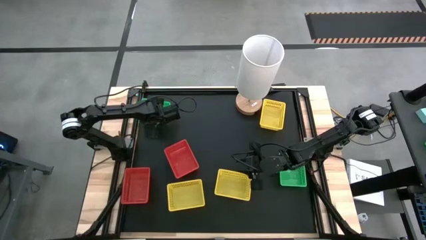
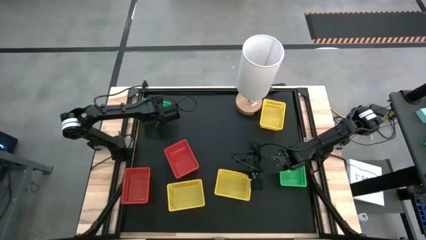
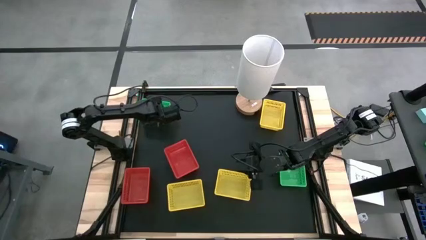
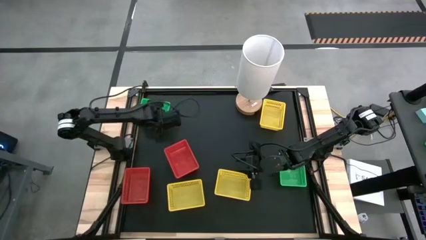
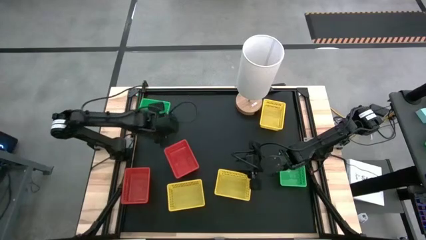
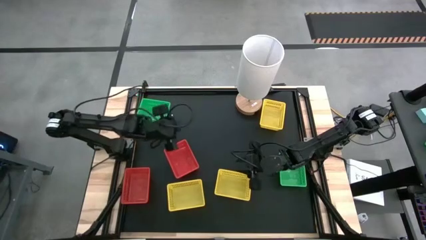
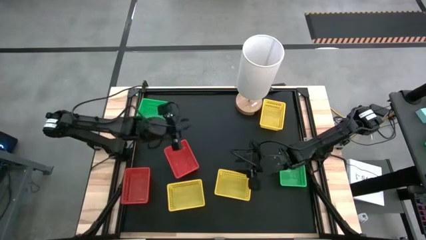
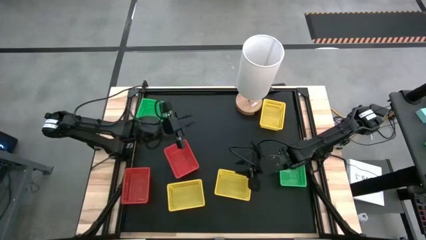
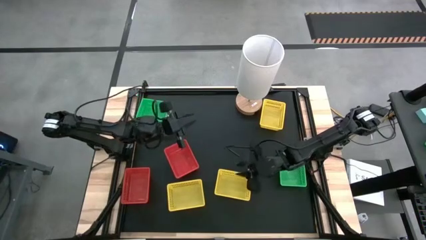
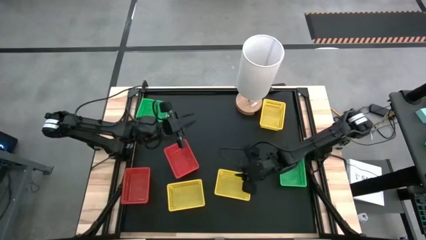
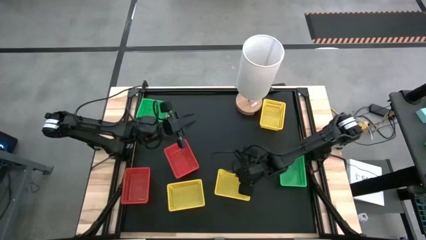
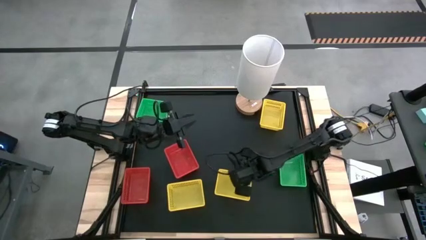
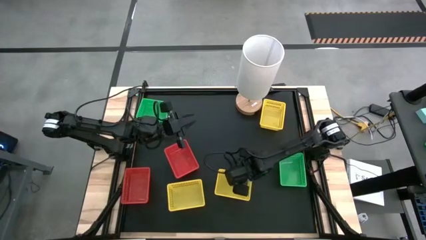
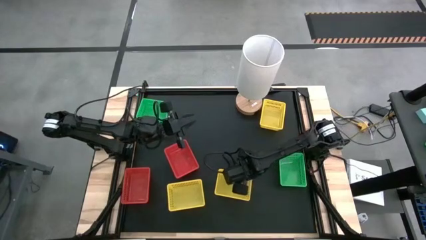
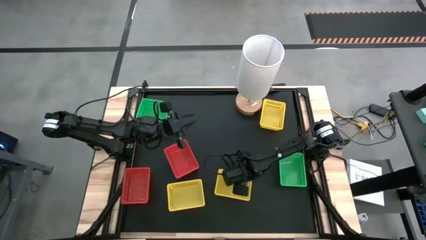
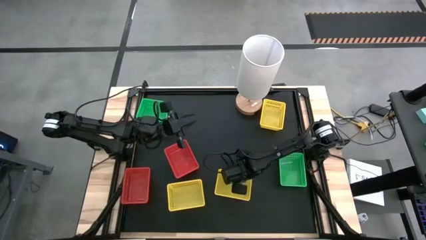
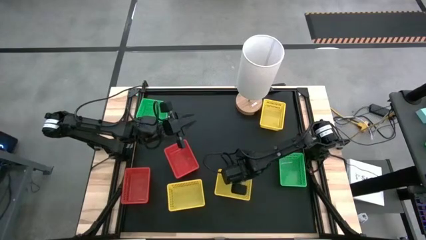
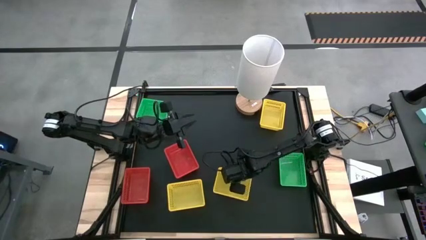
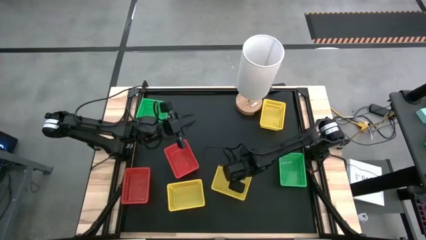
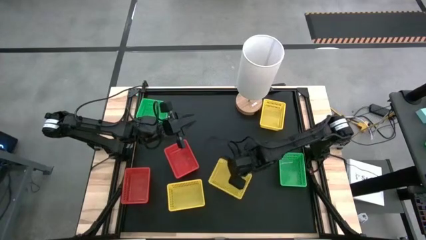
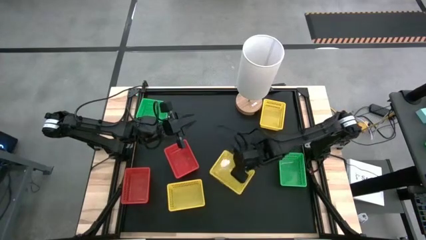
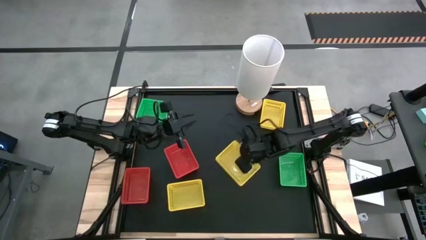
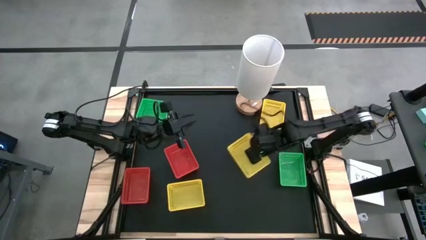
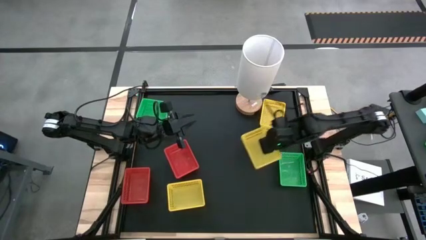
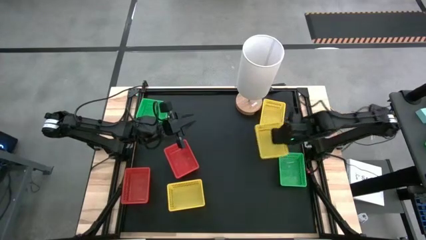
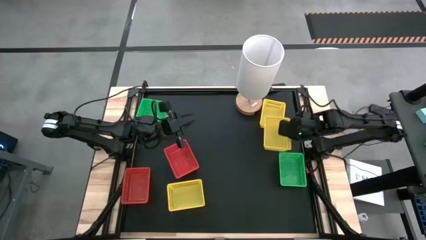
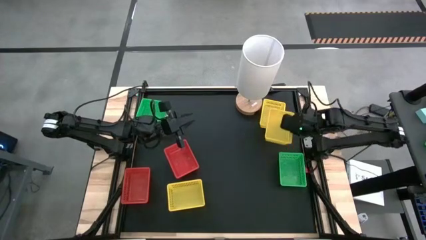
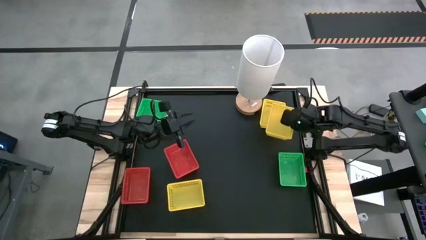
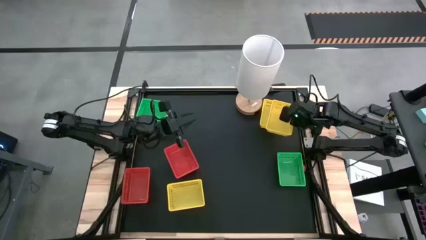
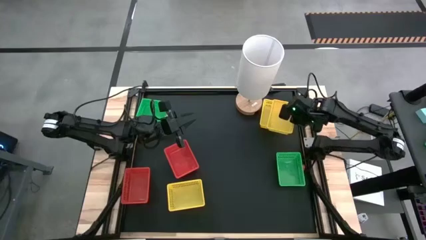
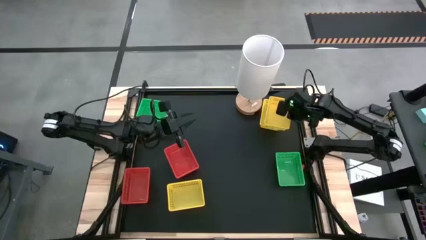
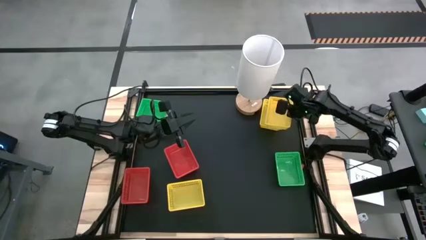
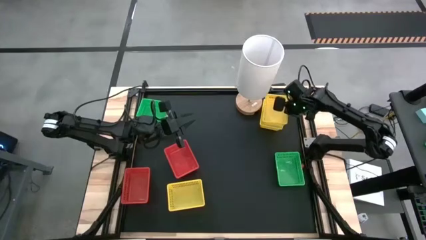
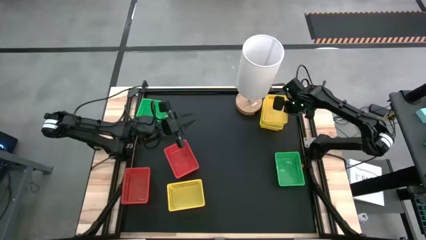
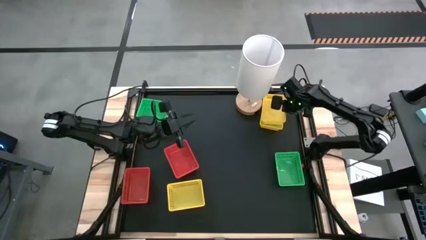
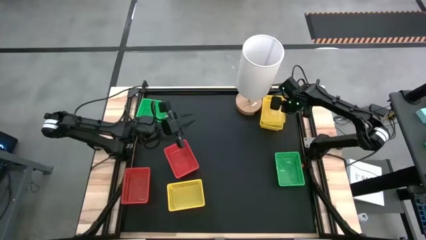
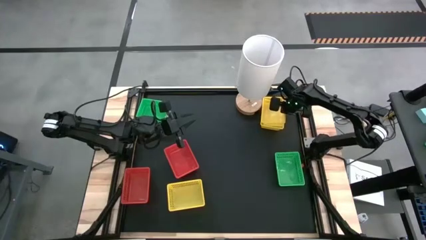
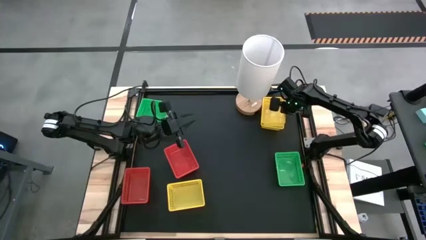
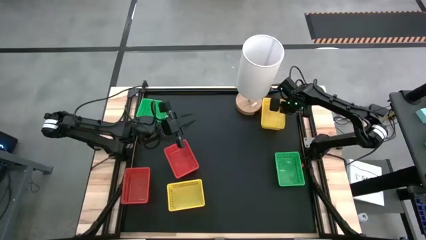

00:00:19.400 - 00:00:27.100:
Stack the bottom right yellow bin on top of the top right yellow bin

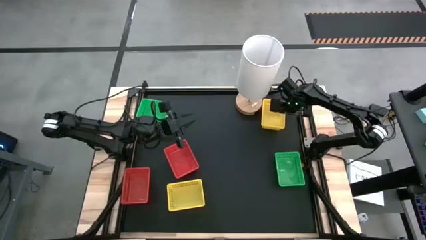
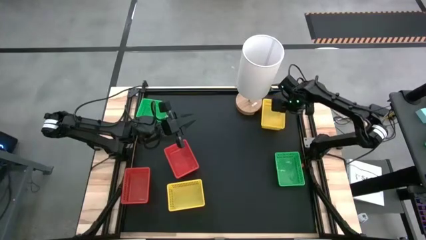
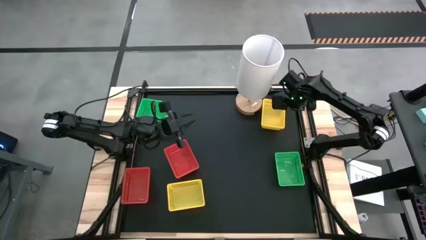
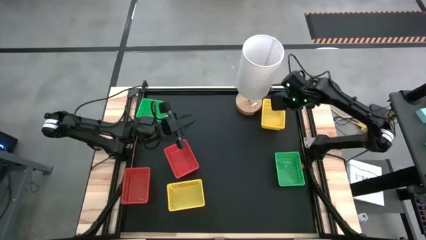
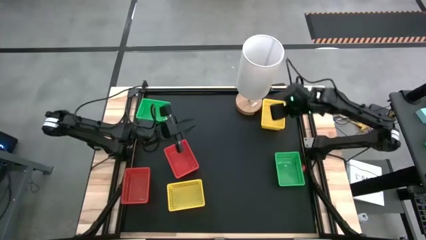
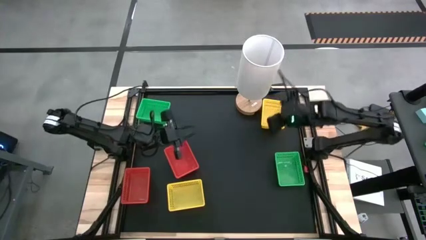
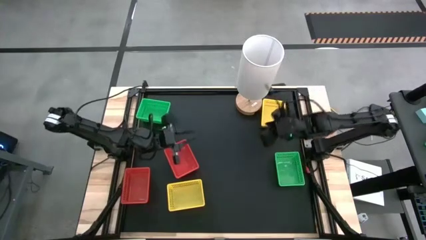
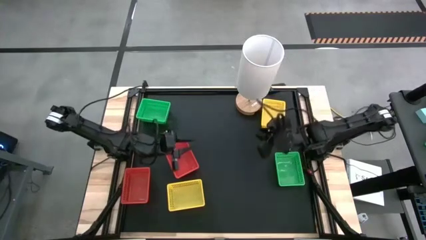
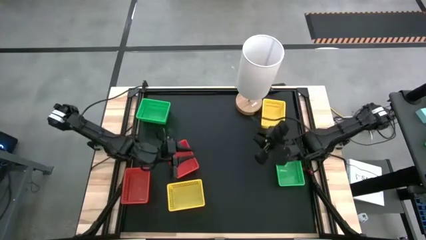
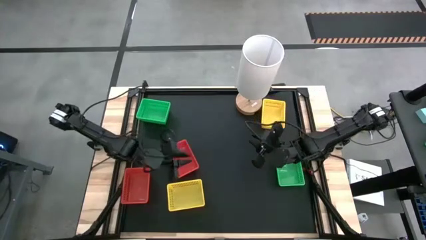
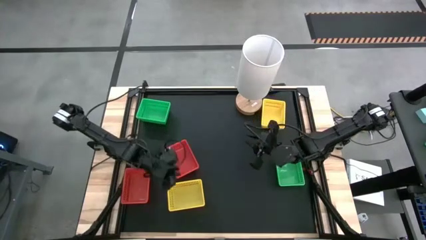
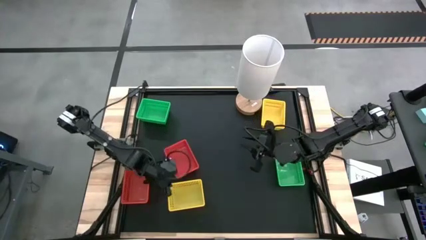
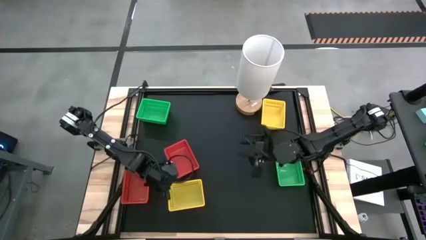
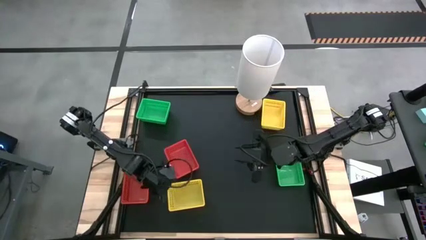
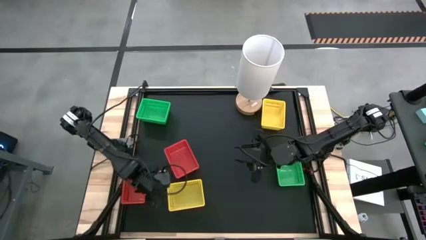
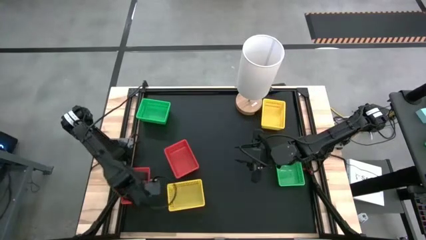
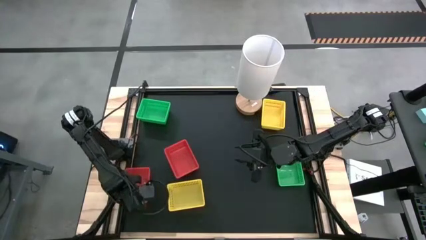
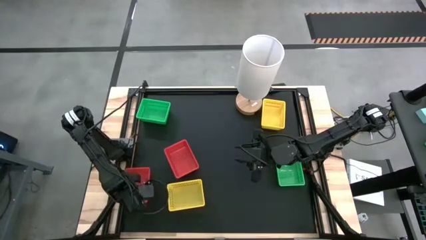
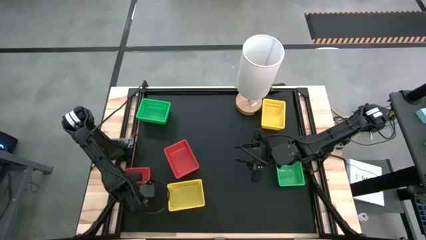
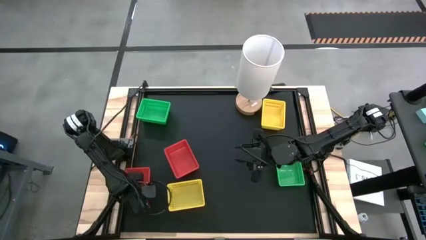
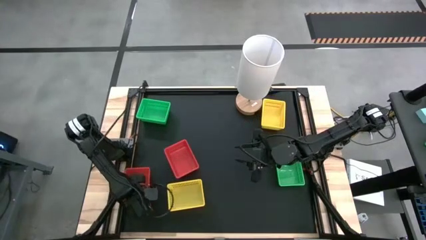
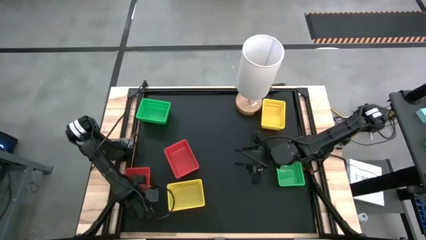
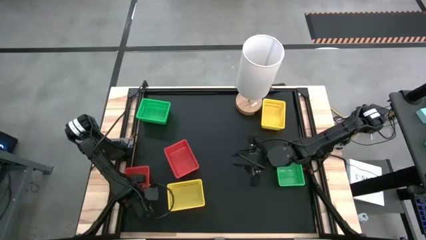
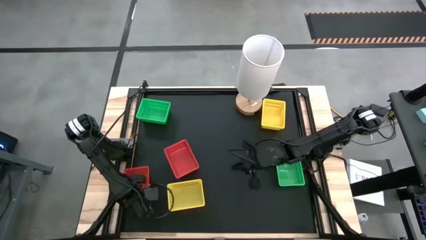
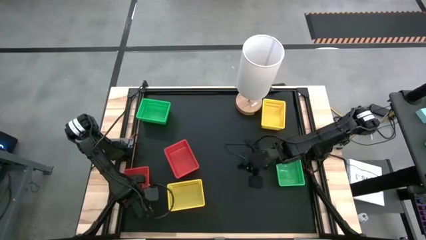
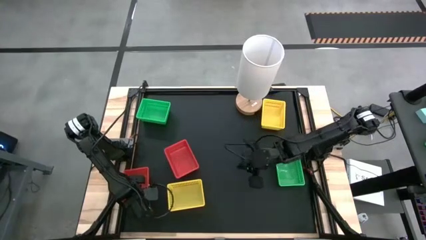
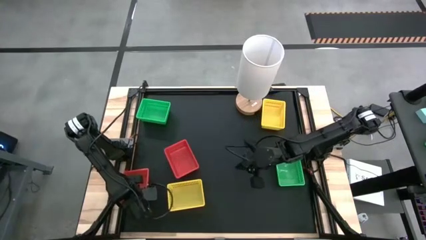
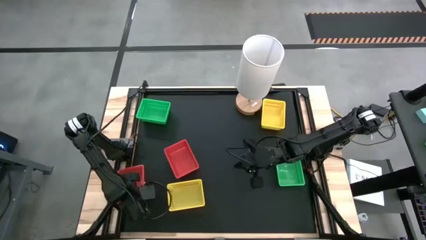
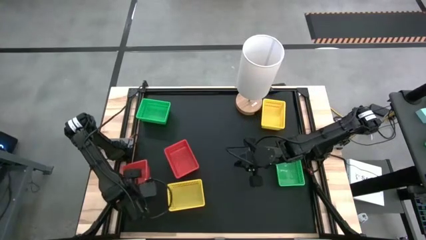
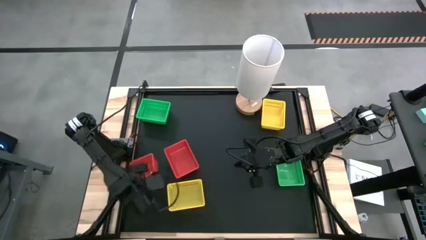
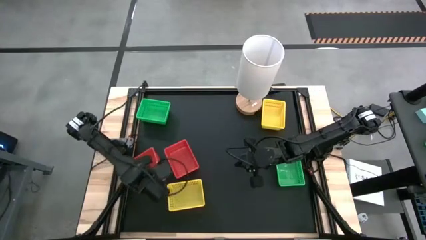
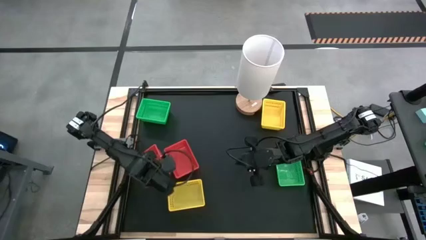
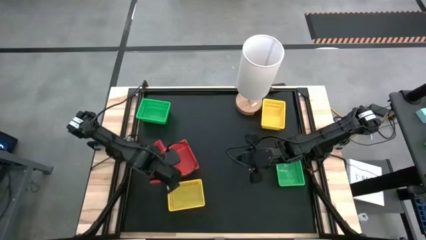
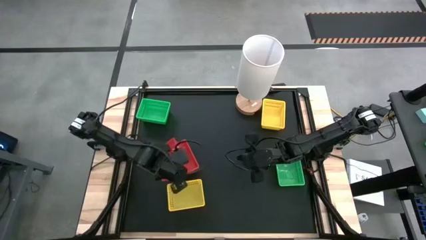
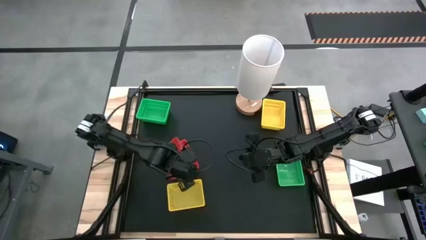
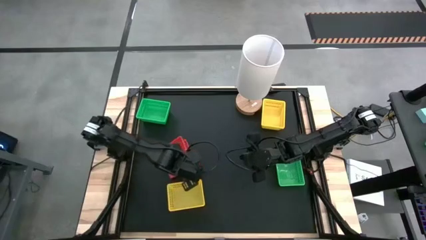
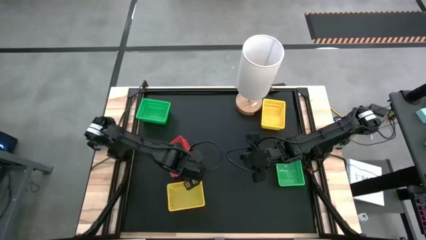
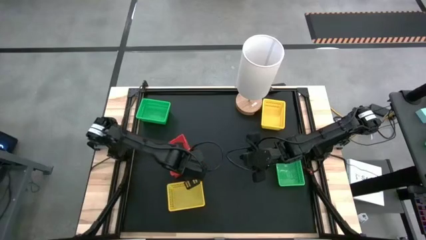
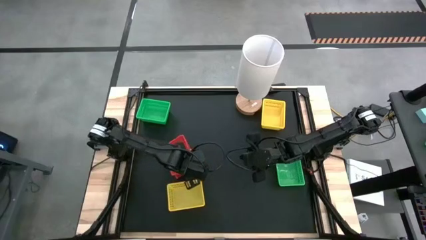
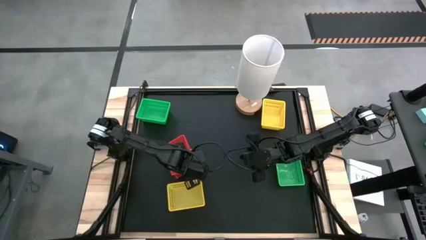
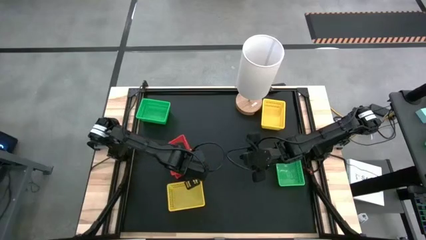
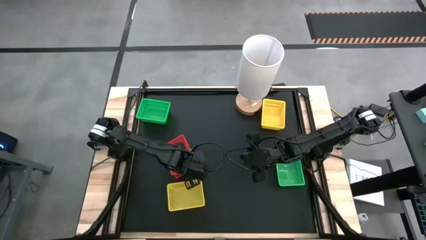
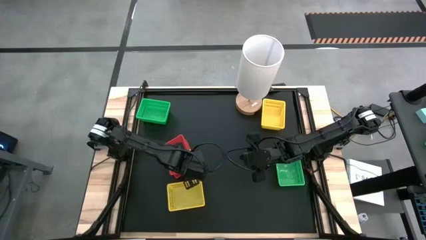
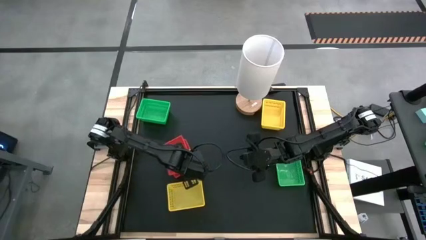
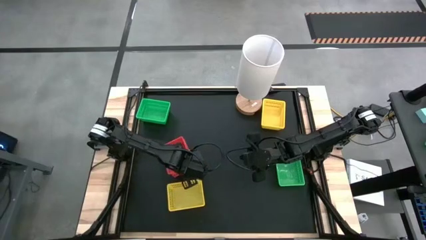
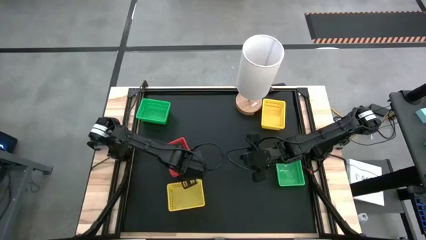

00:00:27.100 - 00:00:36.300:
Stack the left red bin on top of the right red bin
